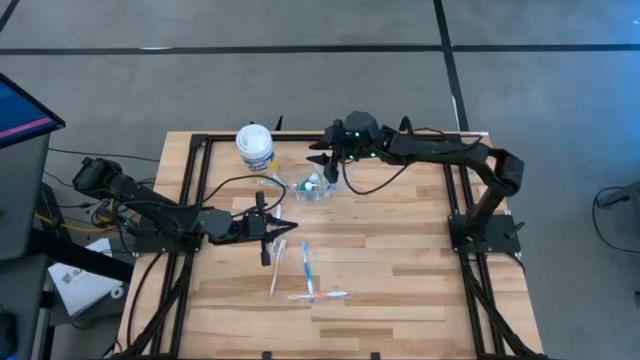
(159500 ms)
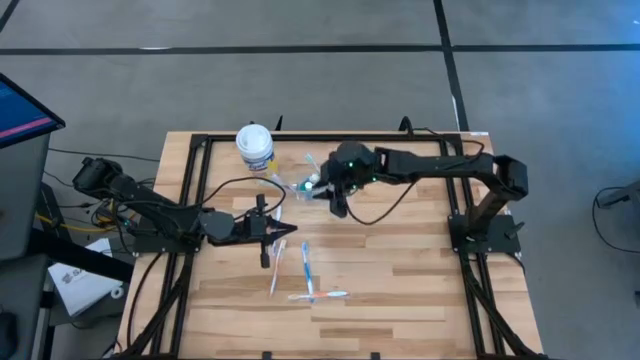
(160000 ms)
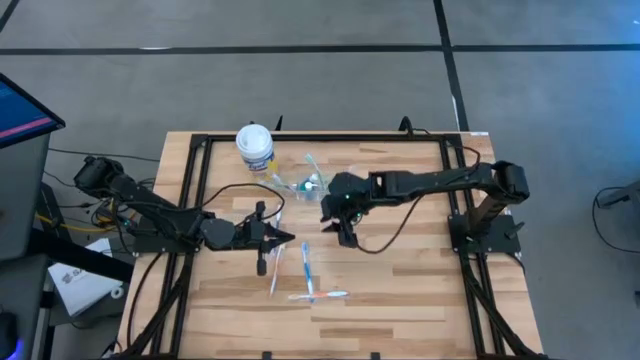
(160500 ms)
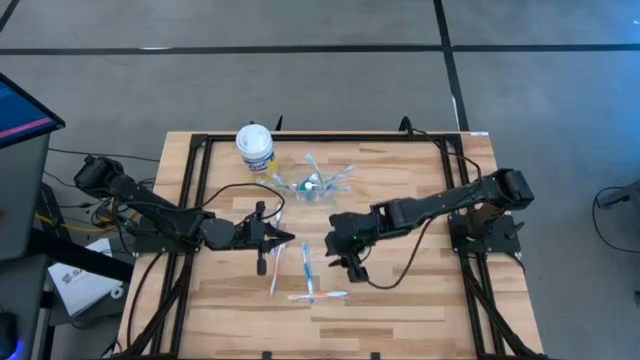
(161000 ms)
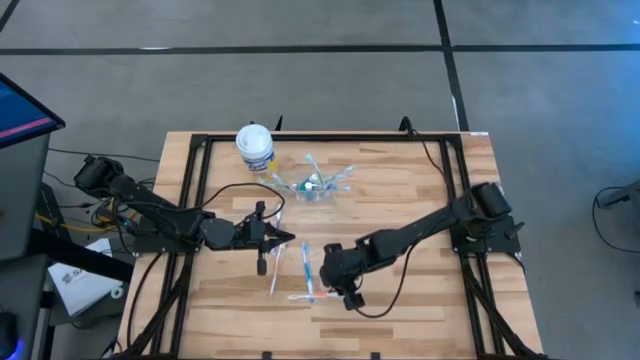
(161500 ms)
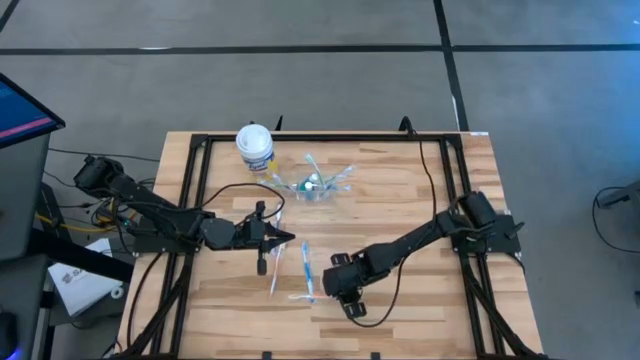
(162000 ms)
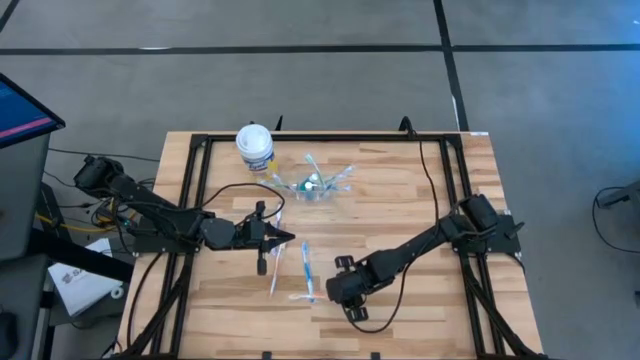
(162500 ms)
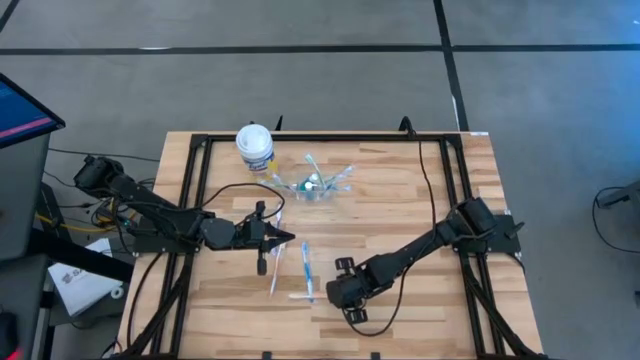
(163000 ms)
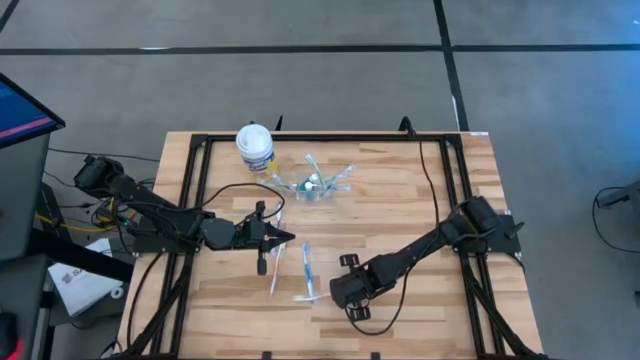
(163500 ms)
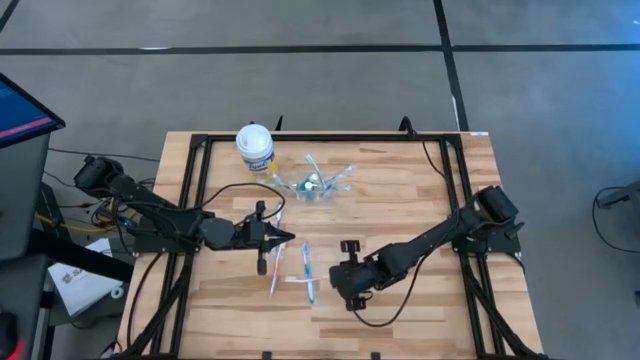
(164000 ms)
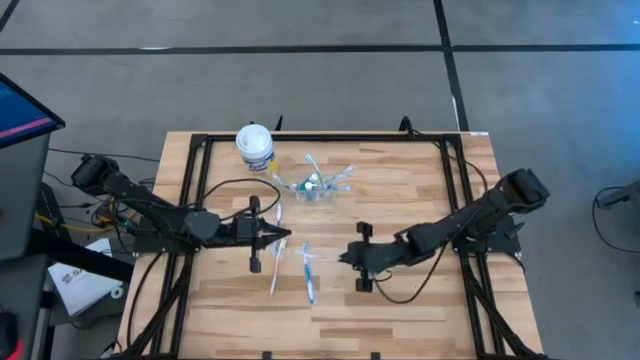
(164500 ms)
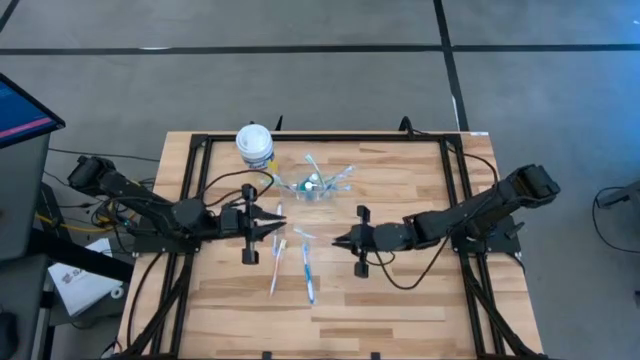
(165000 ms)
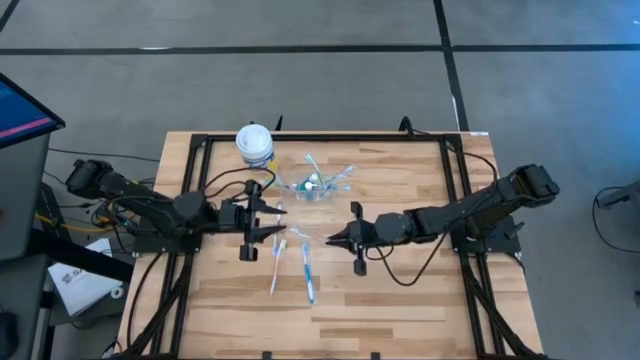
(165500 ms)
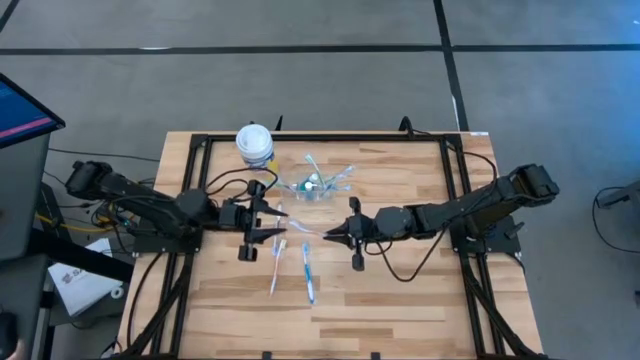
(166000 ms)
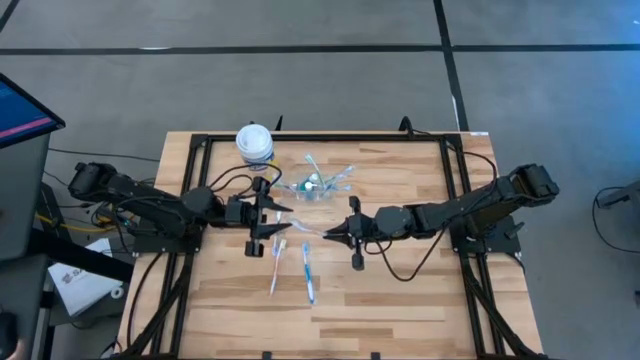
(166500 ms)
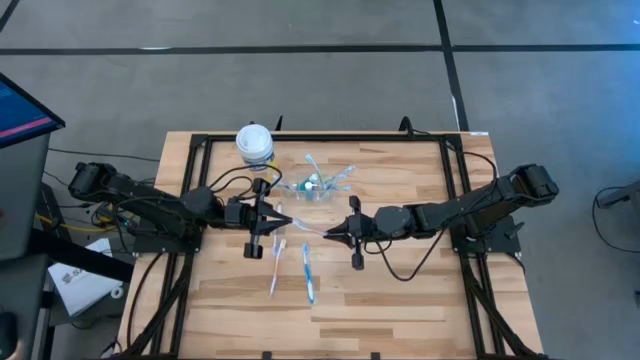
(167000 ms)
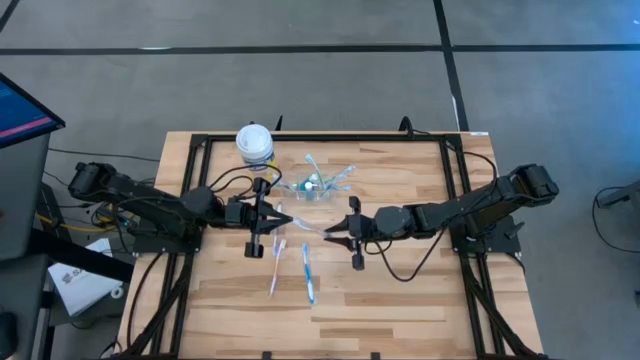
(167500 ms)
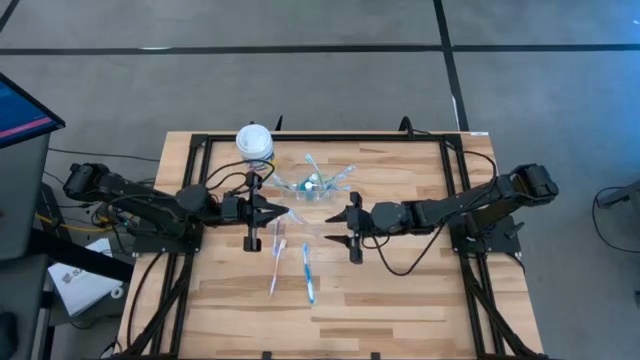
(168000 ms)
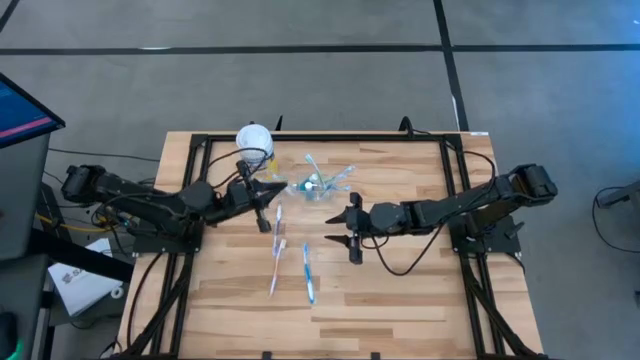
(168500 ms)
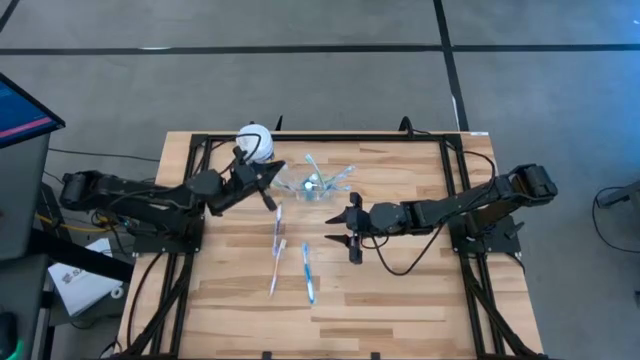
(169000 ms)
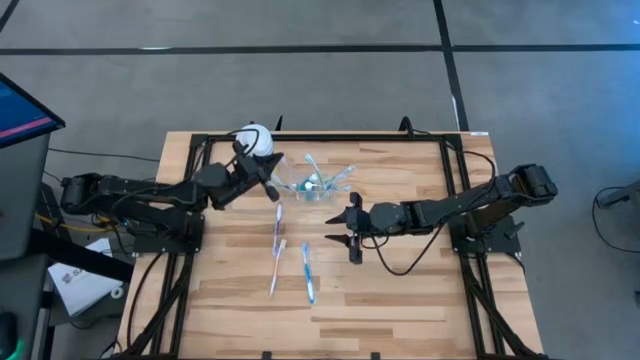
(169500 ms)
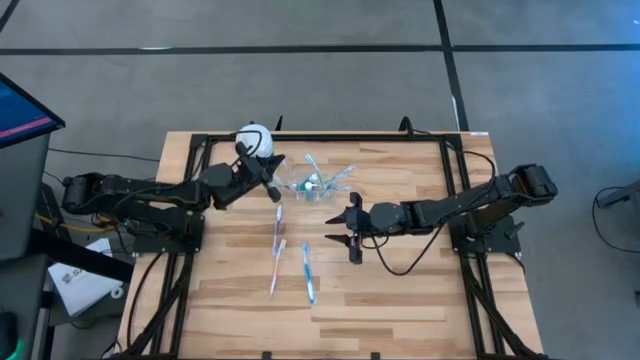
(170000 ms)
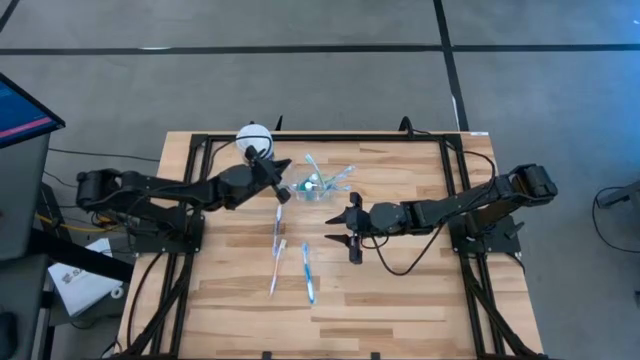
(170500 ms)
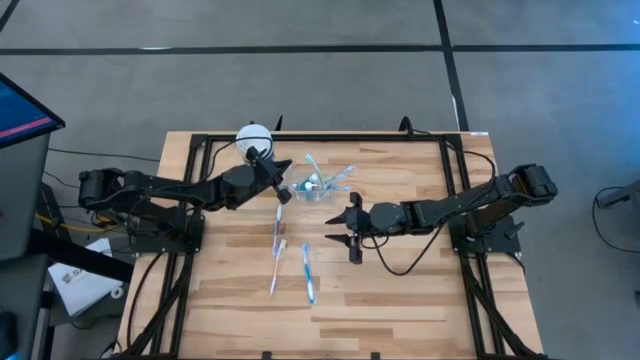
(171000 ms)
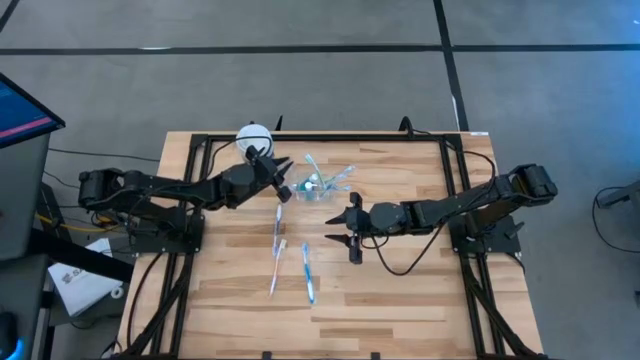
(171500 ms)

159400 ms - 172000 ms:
Task: Pick & Place toothbrushing station
Put the orange toothbrush into the transparent organizer

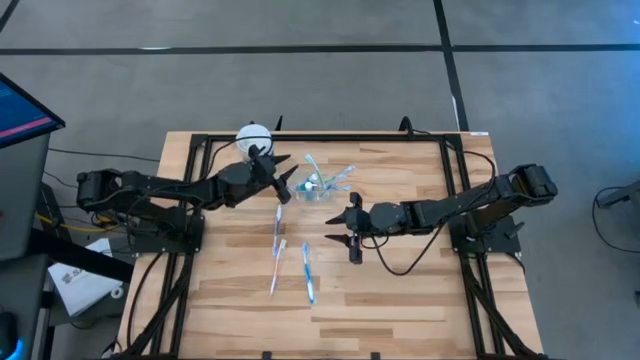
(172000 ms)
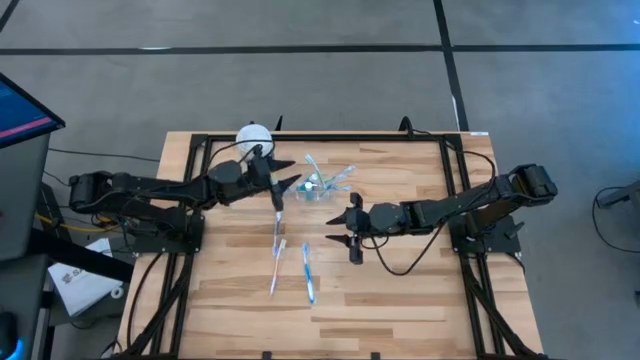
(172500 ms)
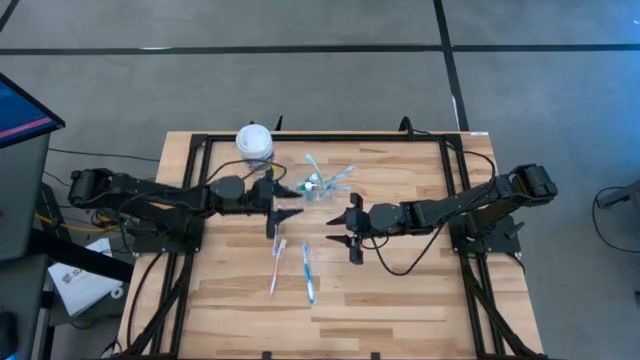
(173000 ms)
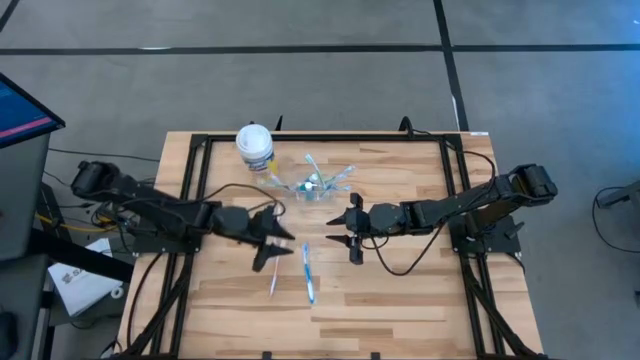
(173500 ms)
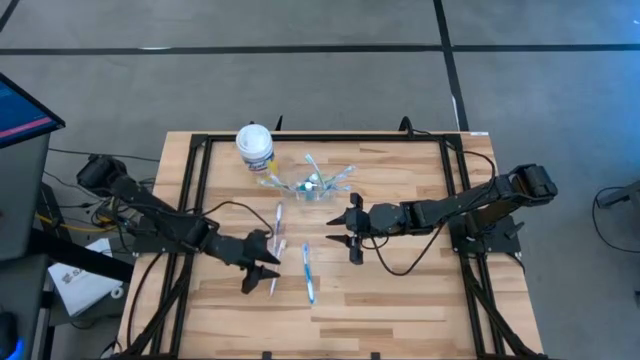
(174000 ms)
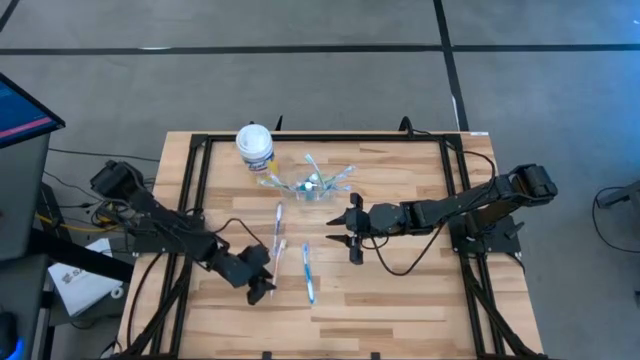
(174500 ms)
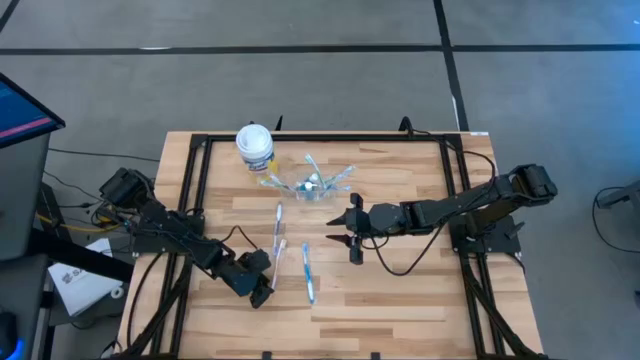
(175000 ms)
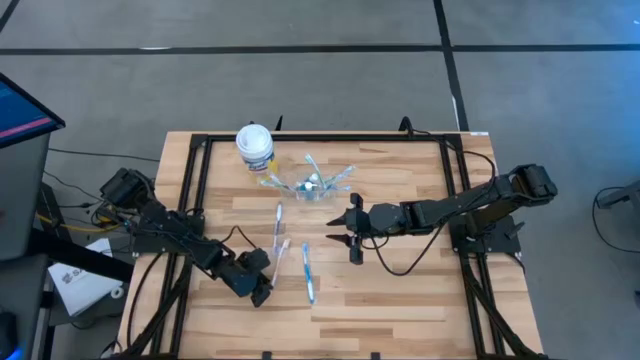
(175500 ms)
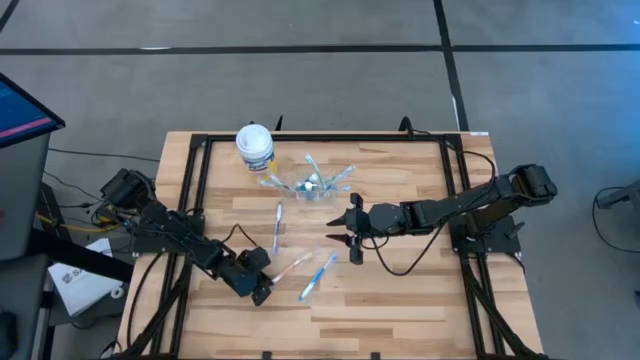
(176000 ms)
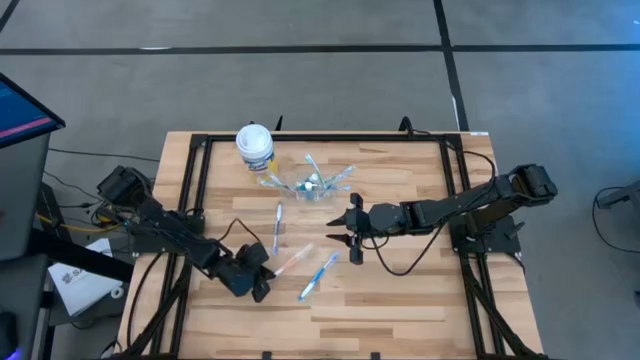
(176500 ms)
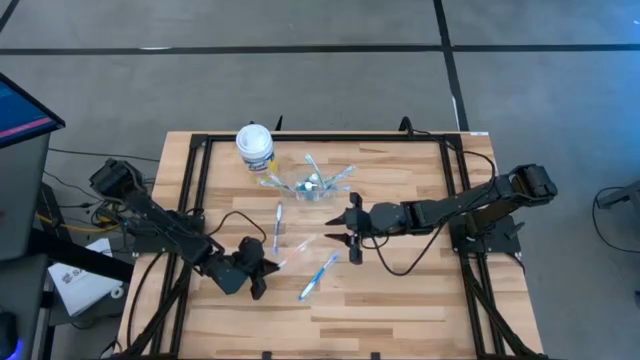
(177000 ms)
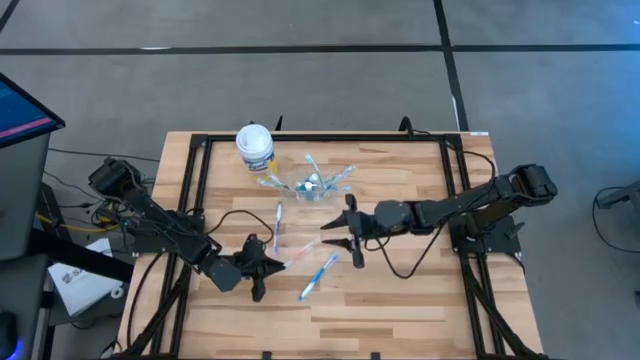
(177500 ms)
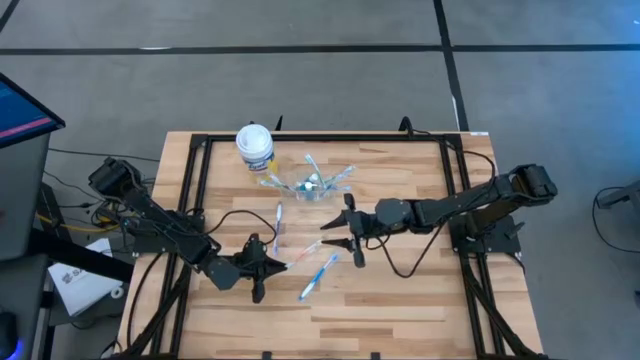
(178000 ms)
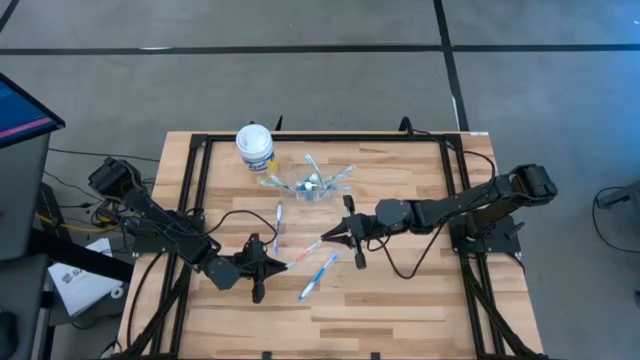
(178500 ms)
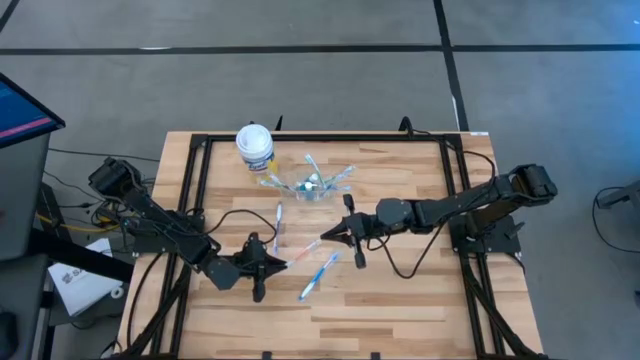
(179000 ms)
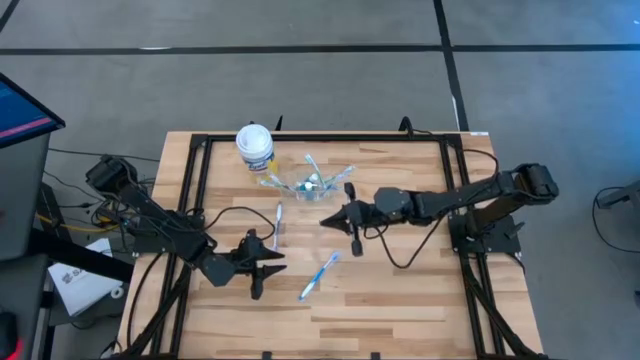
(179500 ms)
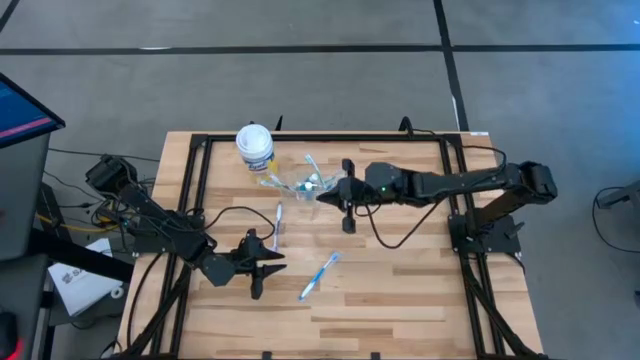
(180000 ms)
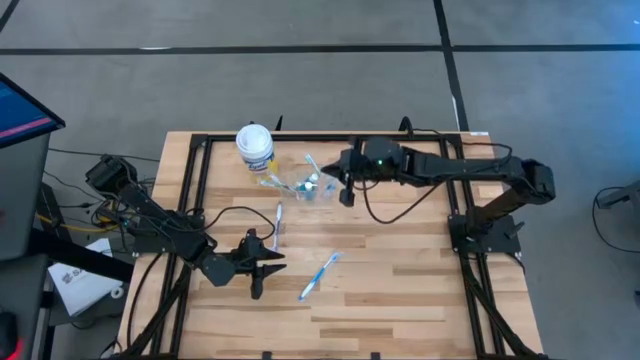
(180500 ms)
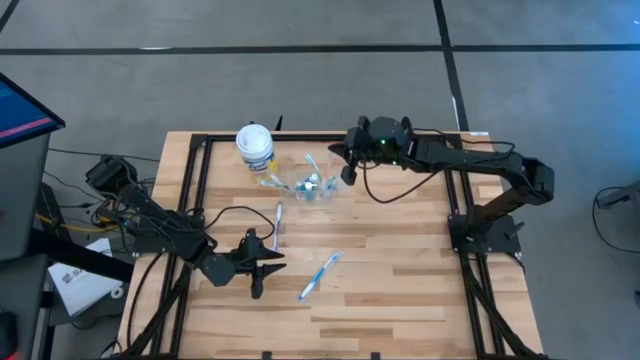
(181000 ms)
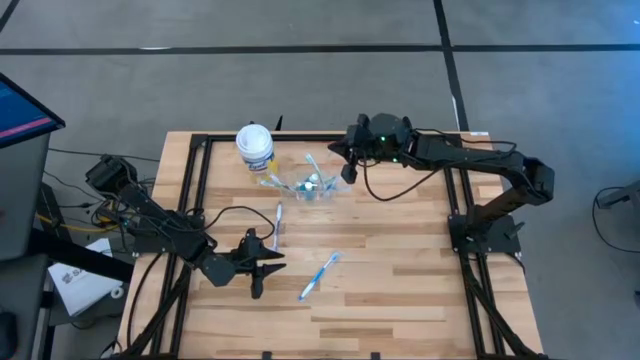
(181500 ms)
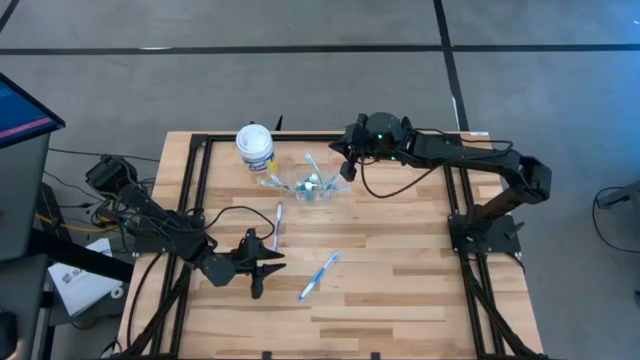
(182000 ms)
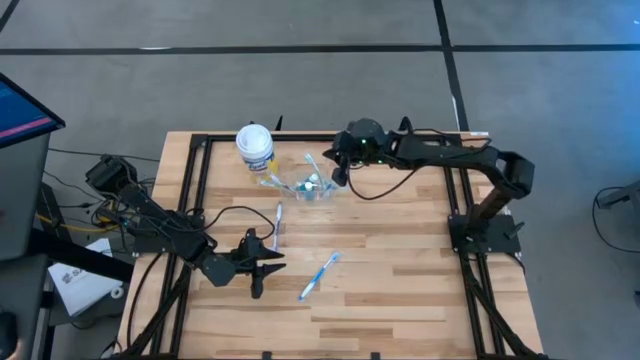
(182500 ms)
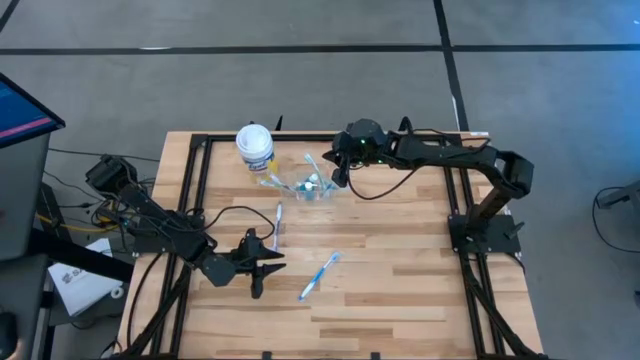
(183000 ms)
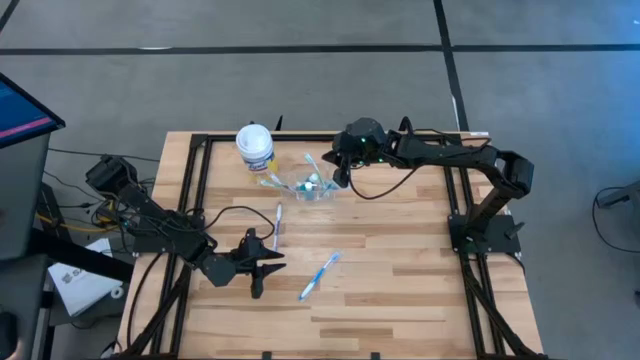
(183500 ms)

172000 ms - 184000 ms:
Put the orange toothbrush into the transparent organizer
